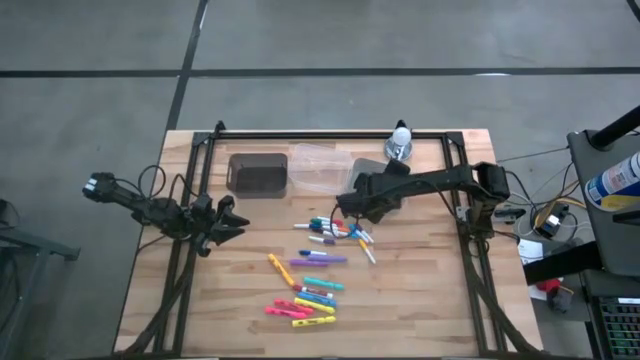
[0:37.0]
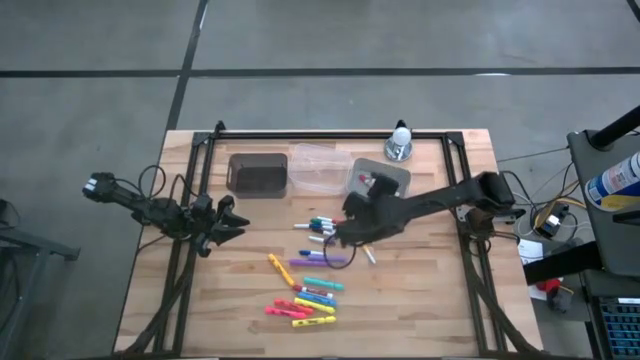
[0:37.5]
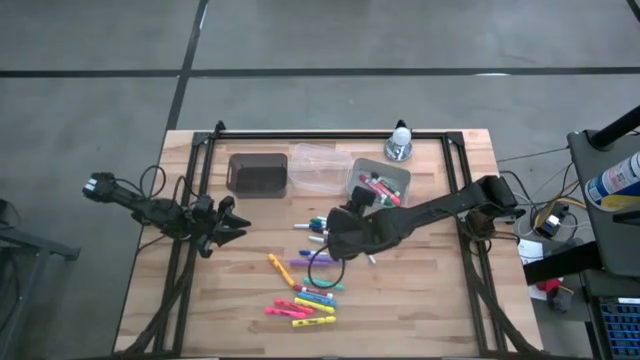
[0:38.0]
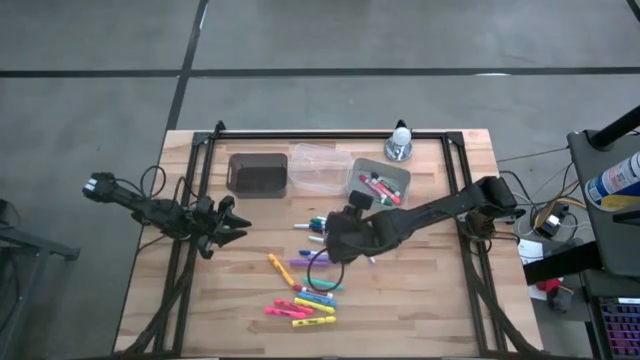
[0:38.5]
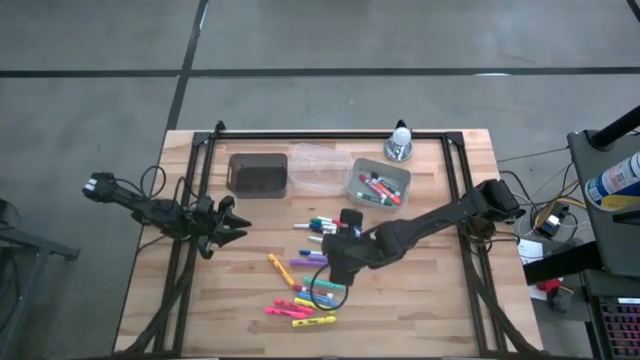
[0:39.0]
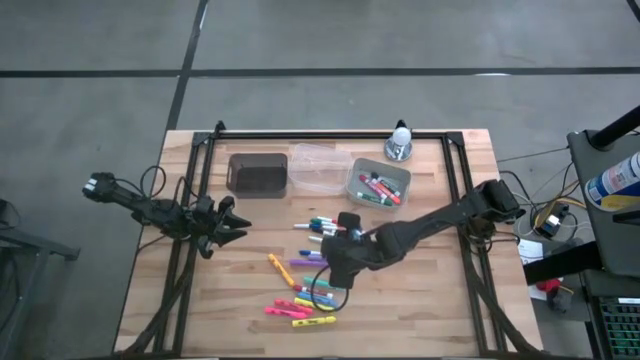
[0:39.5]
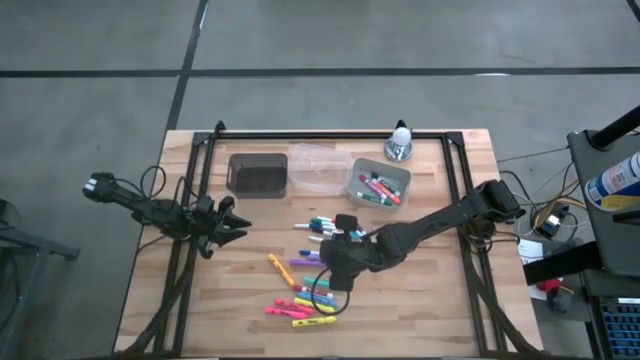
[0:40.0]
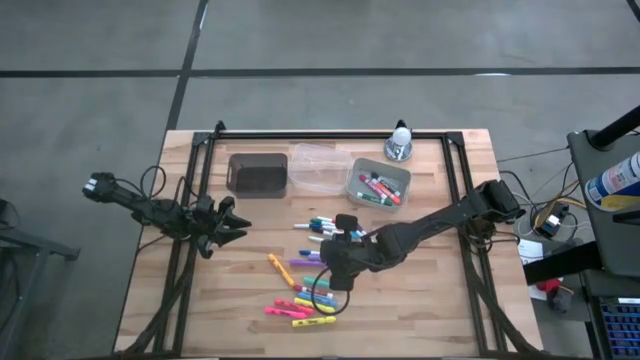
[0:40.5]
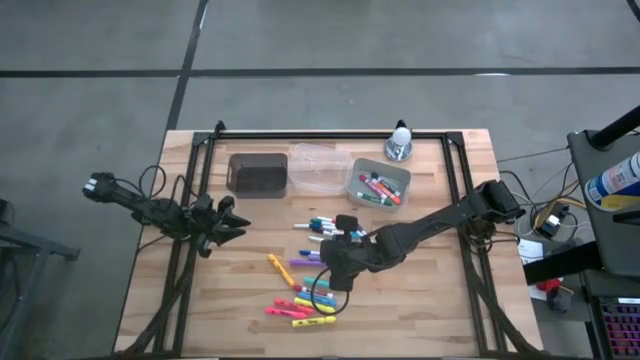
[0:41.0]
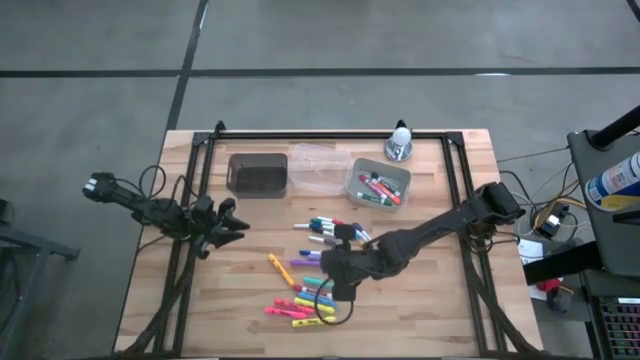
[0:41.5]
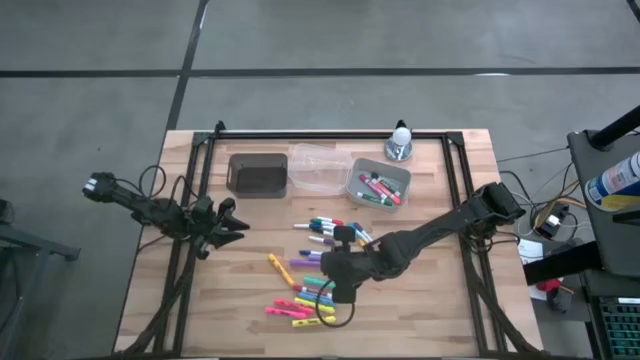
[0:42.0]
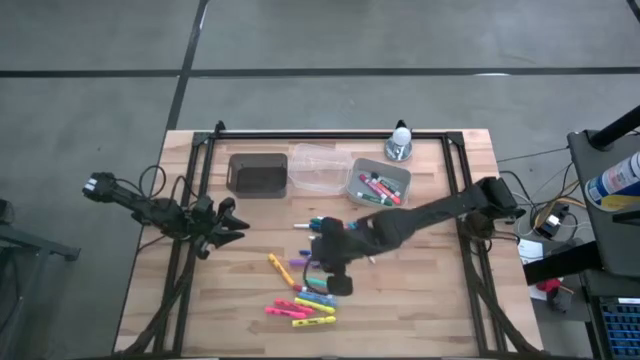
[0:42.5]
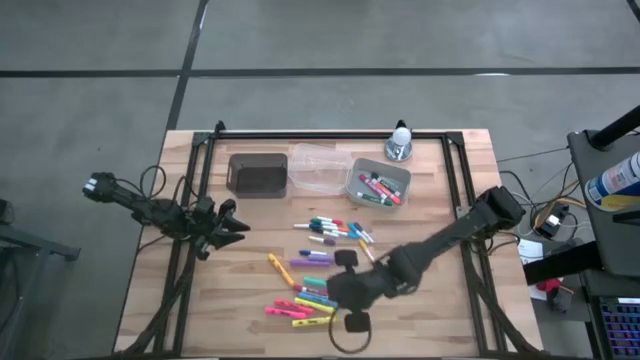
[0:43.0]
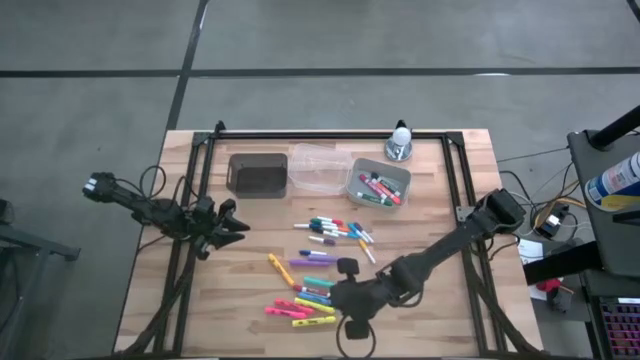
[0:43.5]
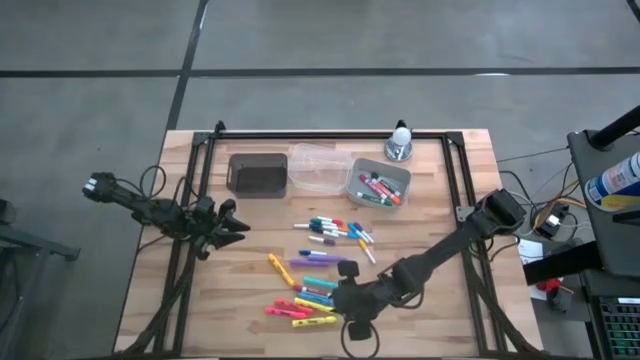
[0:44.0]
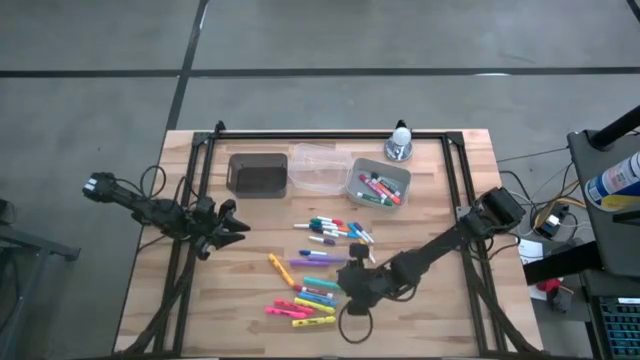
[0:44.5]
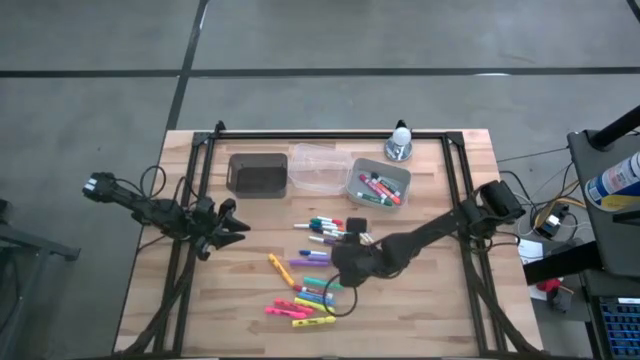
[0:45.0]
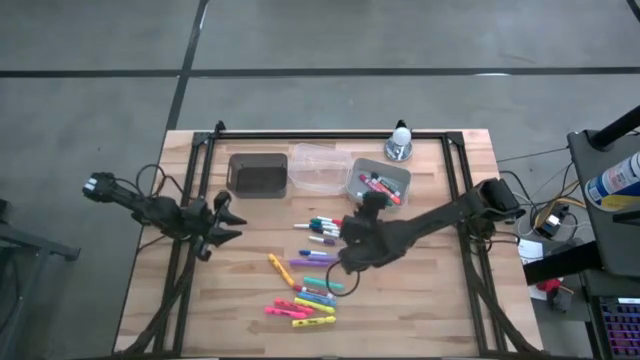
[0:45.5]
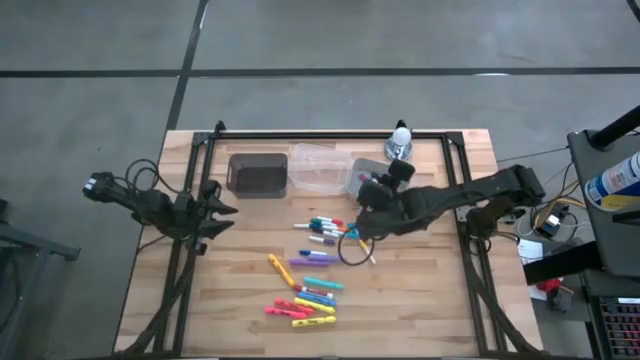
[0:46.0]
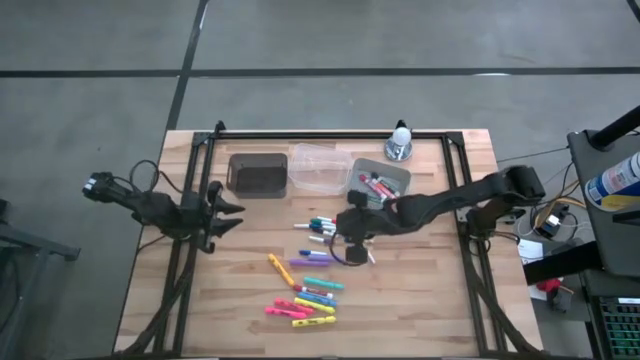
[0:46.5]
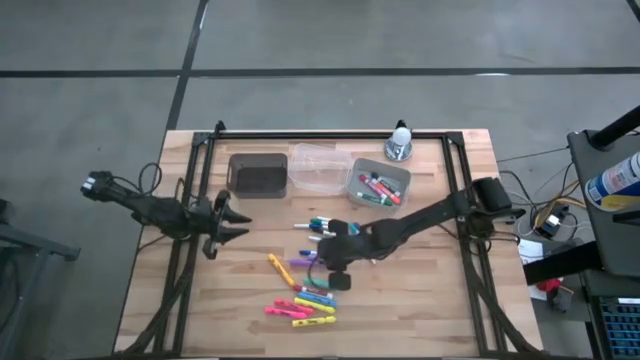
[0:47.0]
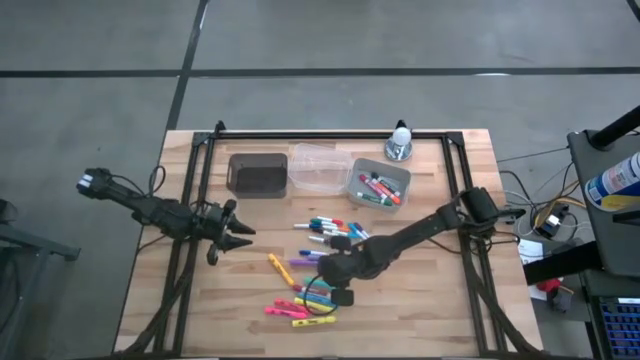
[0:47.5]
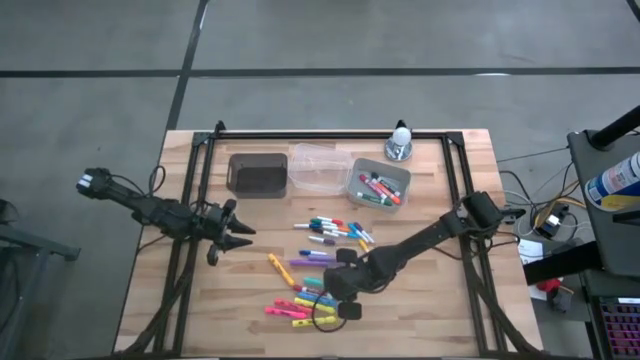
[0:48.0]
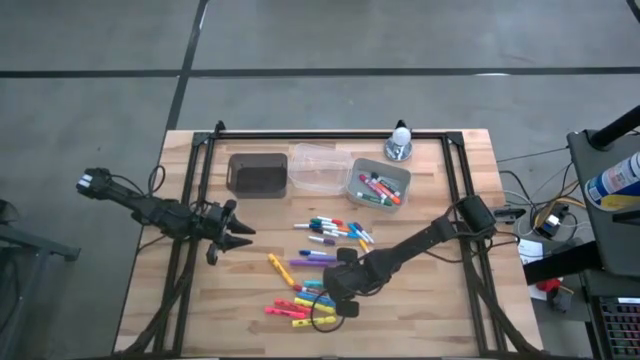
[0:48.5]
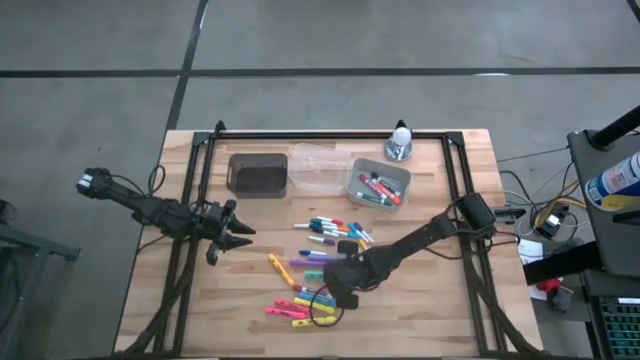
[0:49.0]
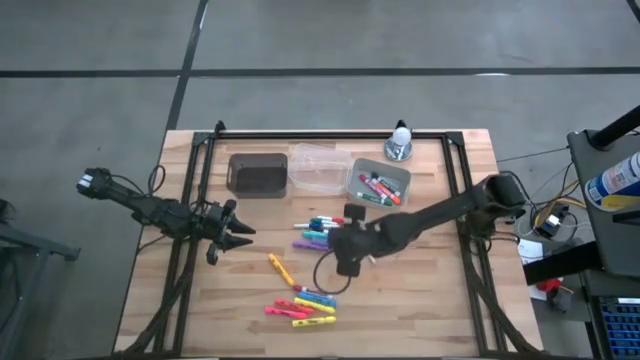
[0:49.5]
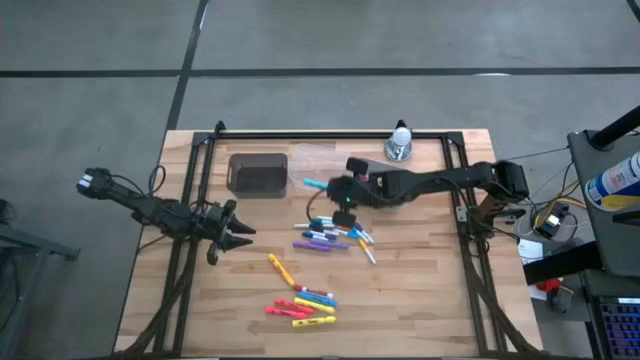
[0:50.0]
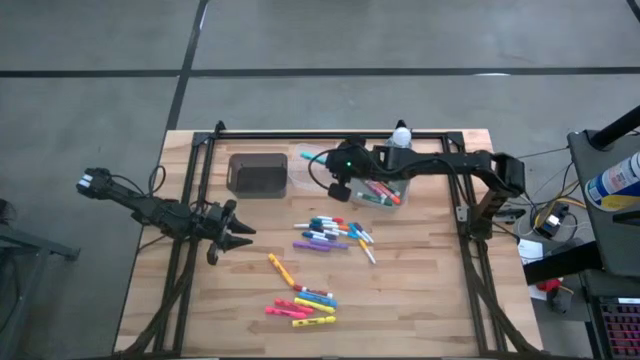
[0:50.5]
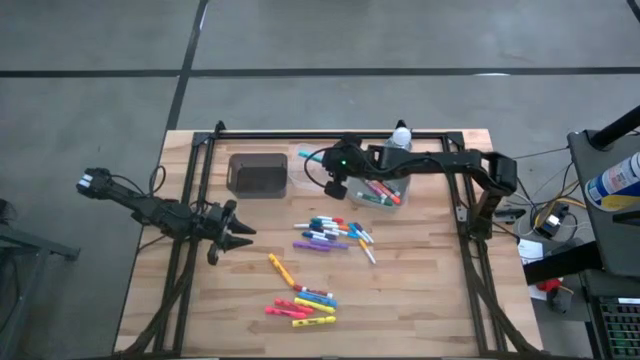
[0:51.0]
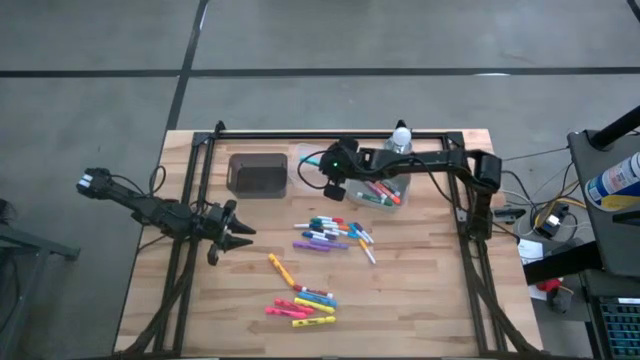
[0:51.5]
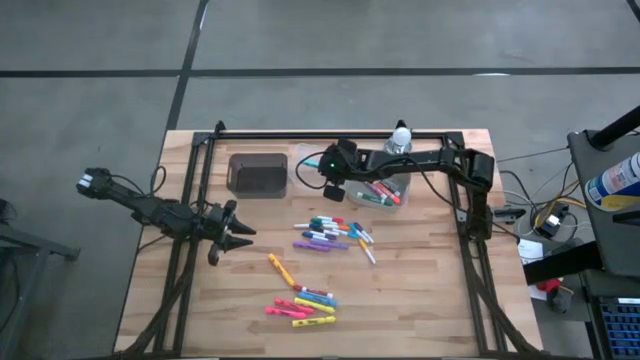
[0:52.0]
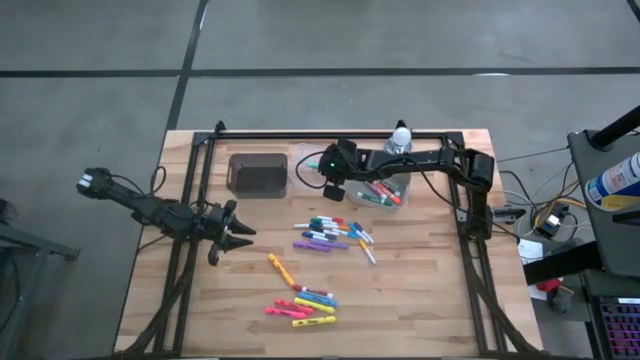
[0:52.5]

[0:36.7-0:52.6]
Task: Pick & Place Markers
Put the light blue highlighter into the transparent bin

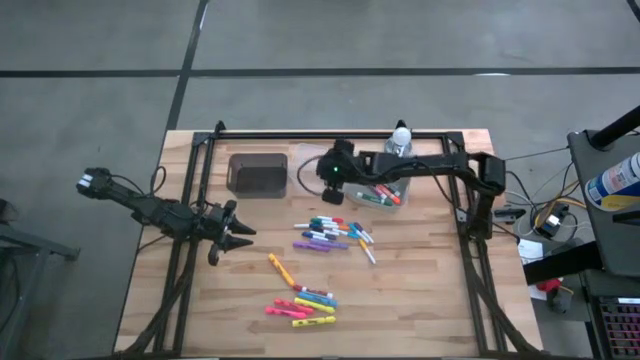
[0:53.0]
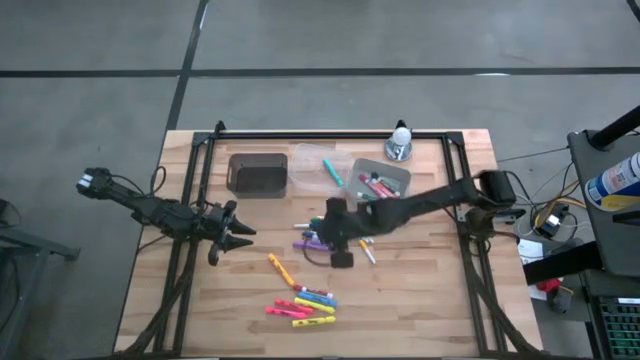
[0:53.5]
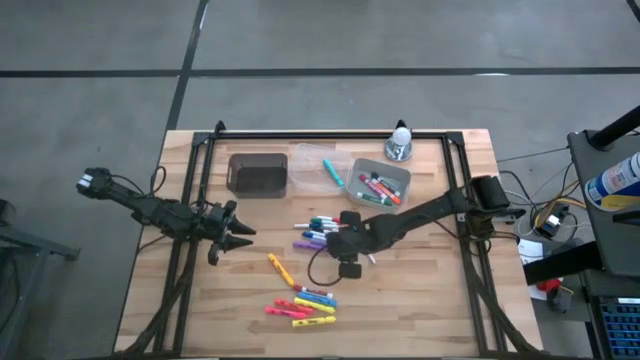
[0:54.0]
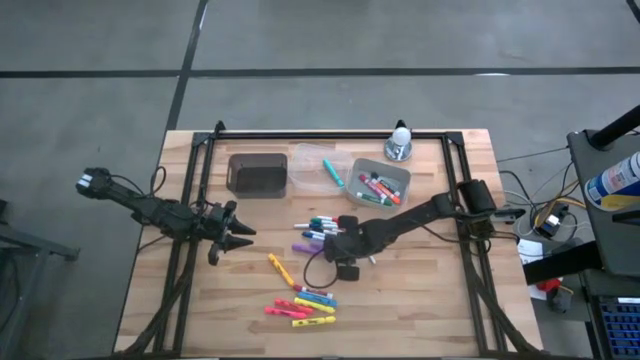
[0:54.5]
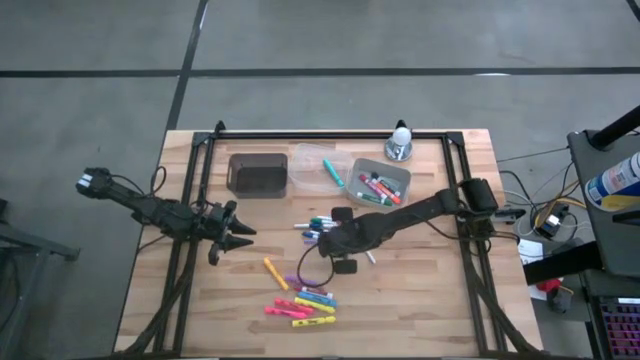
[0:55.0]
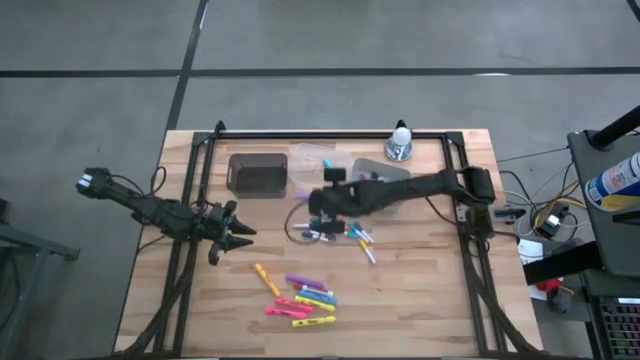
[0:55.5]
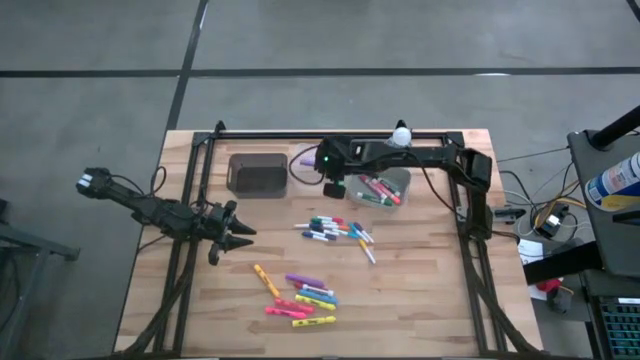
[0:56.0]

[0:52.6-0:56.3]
Put the purple highlighter into the transparent bin

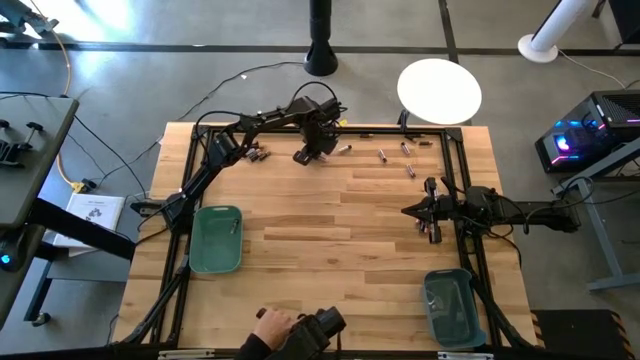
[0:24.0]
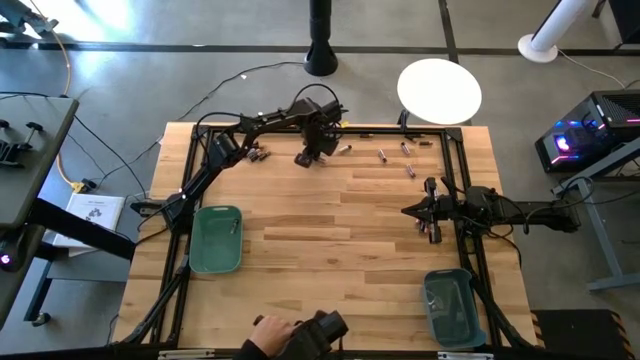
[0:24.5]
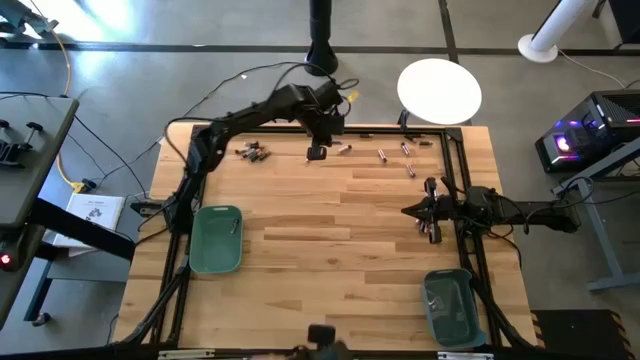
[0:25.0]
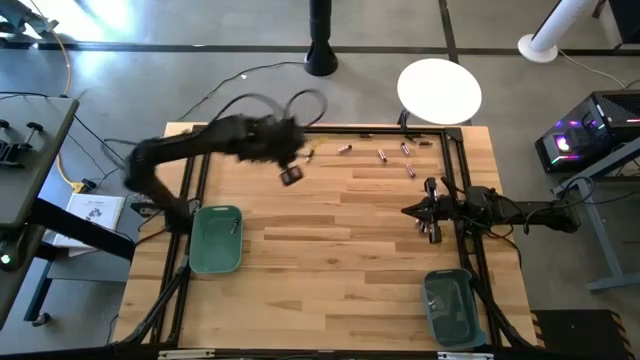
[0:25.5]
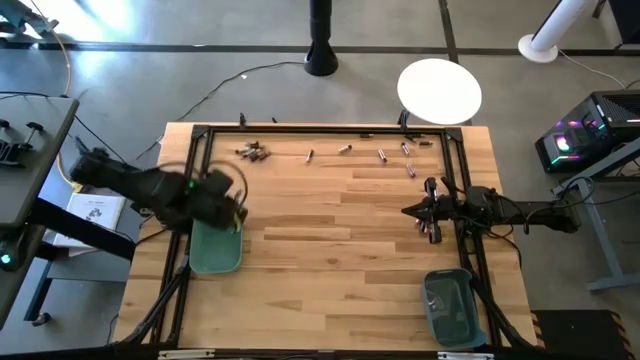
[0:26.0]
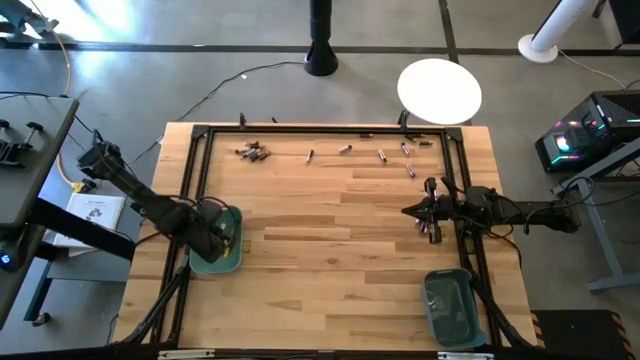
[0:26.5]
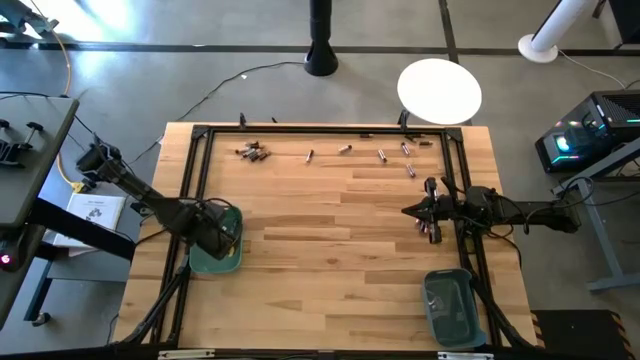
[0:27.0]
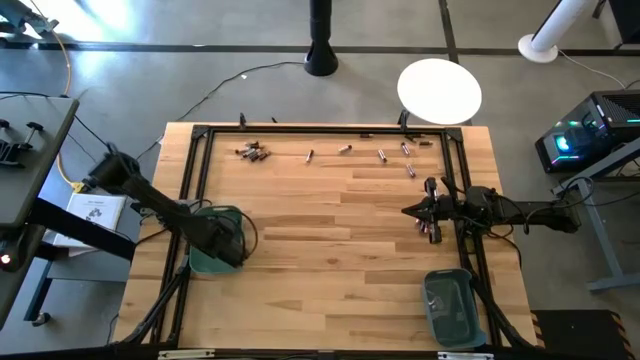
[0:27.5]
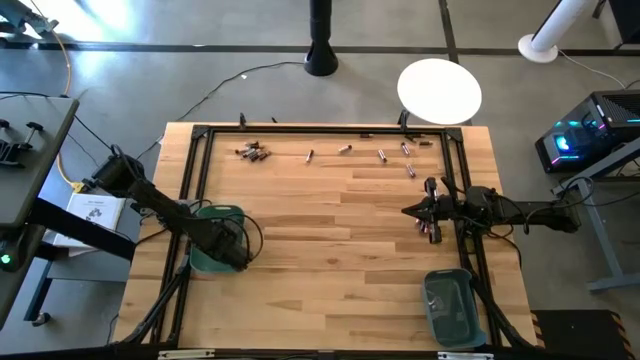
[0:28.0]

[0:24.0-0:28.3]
Task: Sort batteries
Put the silver battery into the green bin
